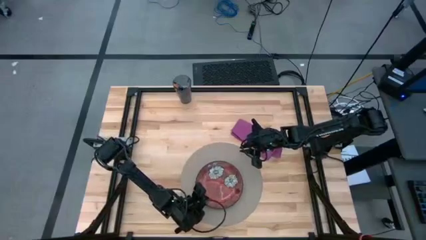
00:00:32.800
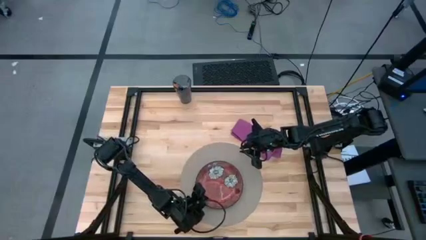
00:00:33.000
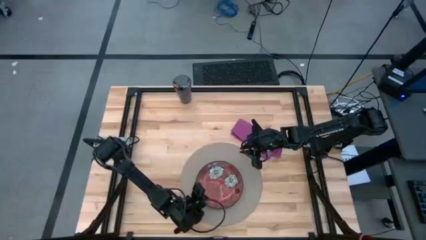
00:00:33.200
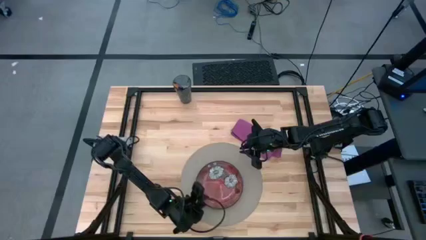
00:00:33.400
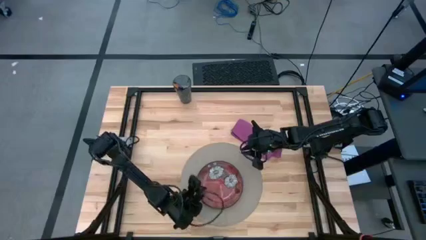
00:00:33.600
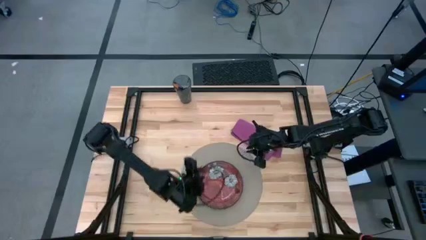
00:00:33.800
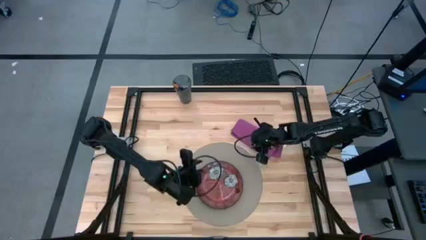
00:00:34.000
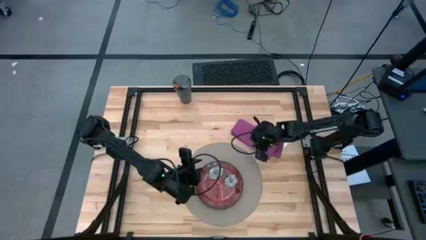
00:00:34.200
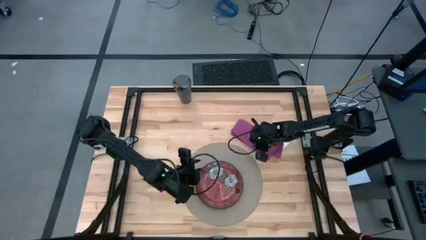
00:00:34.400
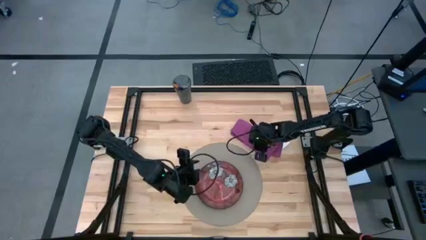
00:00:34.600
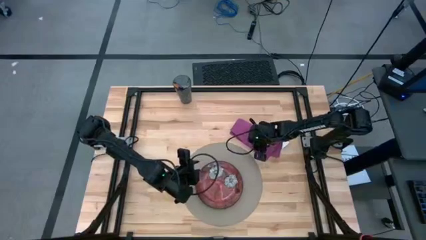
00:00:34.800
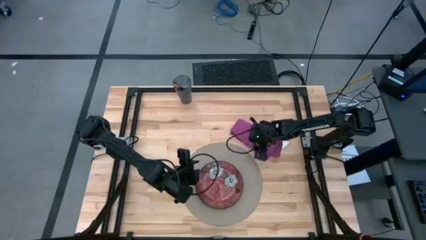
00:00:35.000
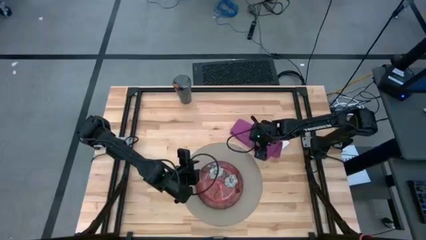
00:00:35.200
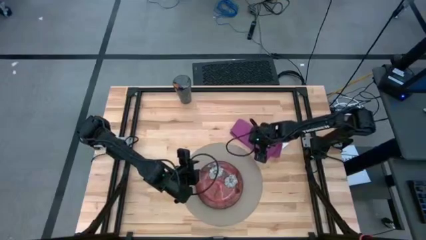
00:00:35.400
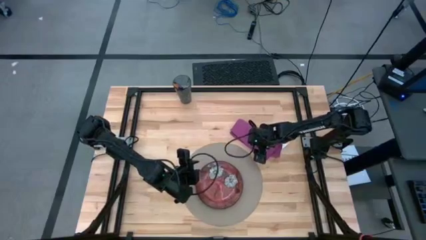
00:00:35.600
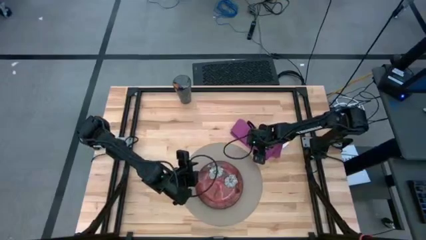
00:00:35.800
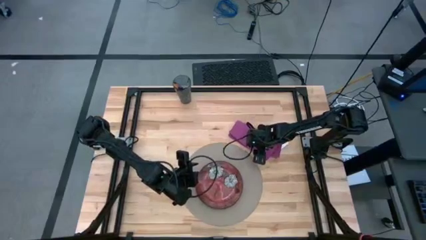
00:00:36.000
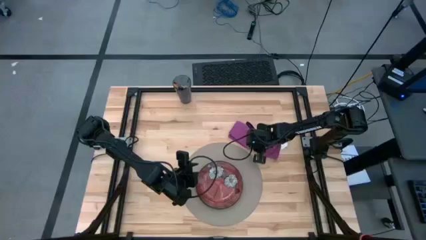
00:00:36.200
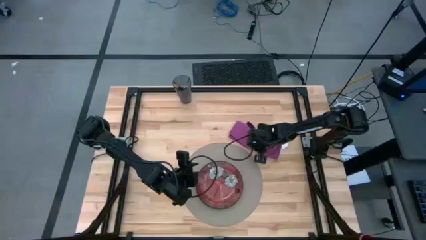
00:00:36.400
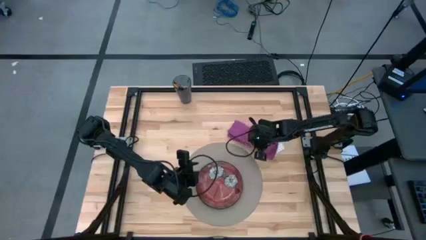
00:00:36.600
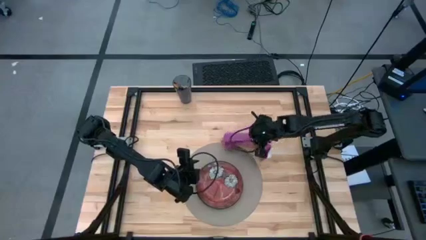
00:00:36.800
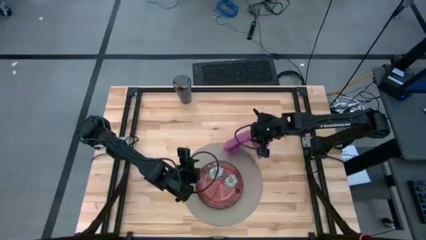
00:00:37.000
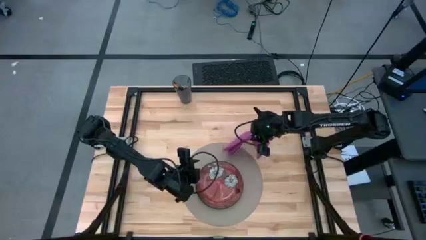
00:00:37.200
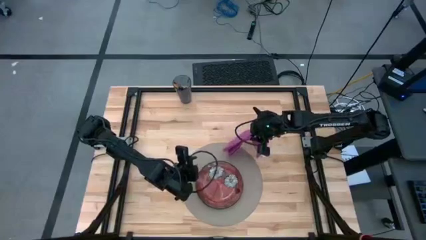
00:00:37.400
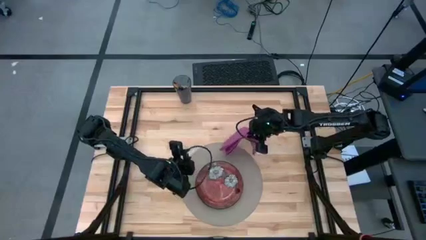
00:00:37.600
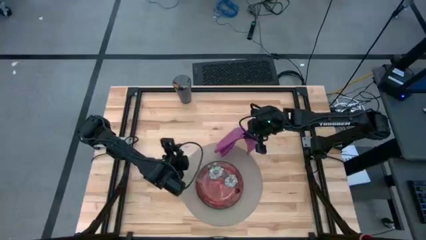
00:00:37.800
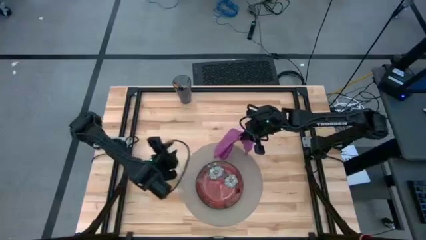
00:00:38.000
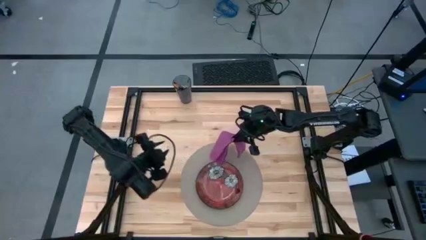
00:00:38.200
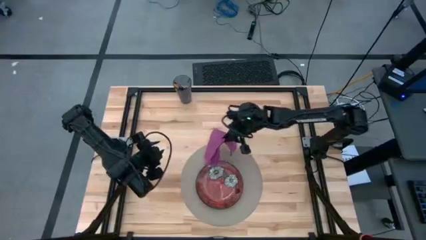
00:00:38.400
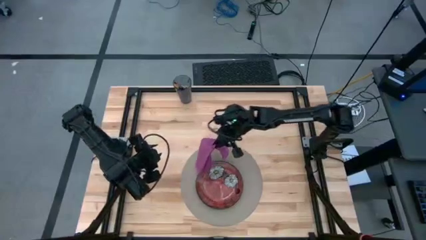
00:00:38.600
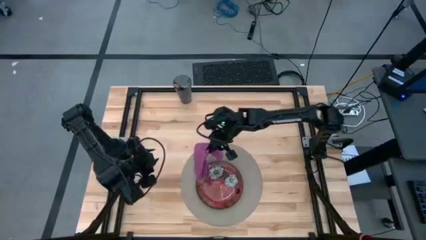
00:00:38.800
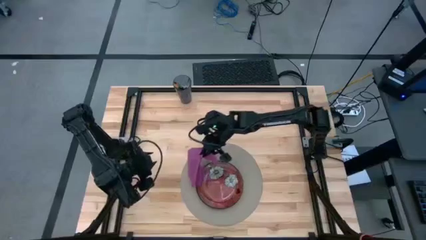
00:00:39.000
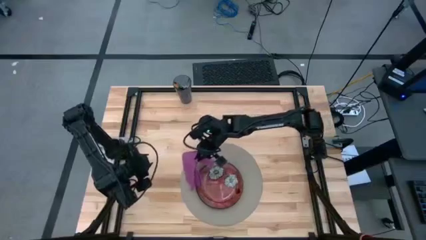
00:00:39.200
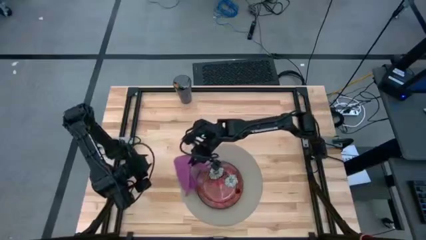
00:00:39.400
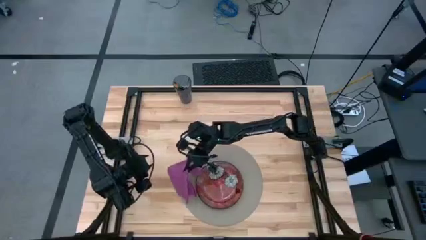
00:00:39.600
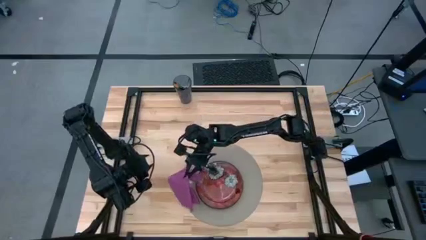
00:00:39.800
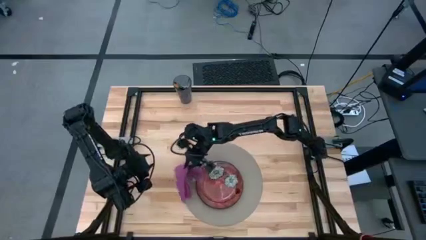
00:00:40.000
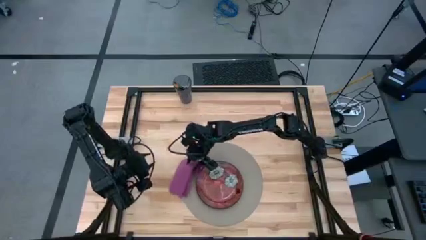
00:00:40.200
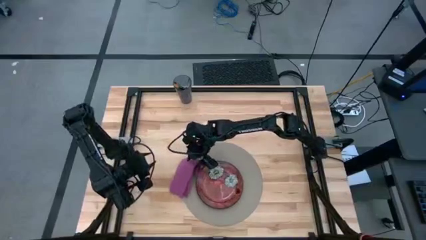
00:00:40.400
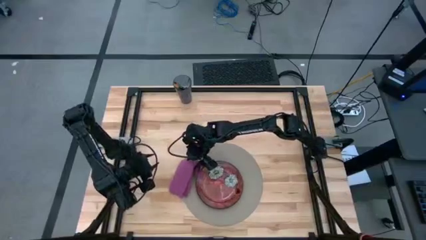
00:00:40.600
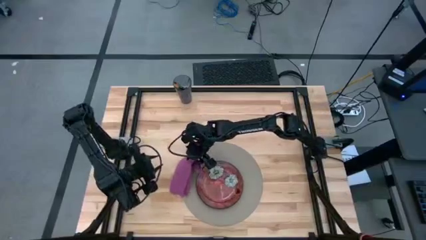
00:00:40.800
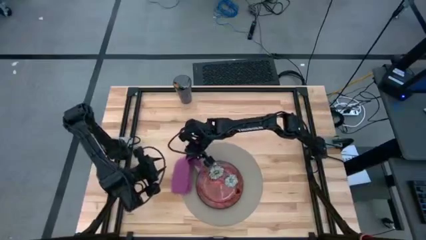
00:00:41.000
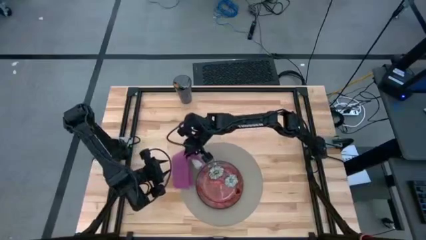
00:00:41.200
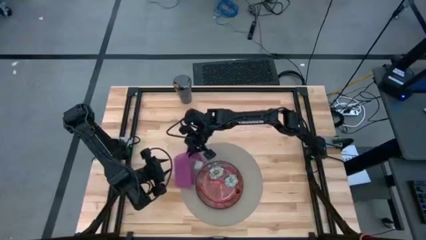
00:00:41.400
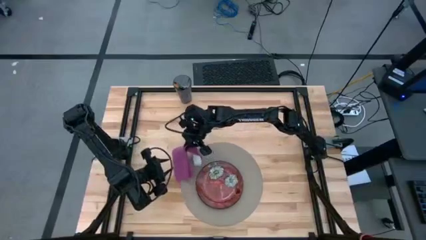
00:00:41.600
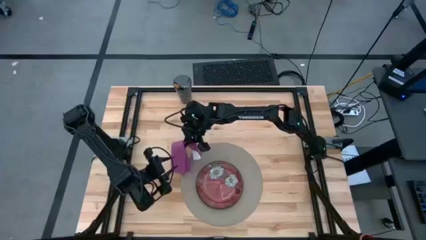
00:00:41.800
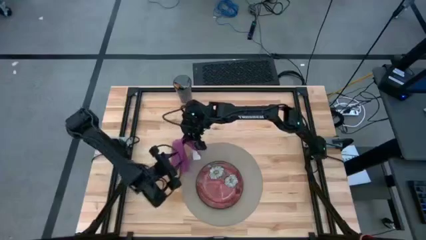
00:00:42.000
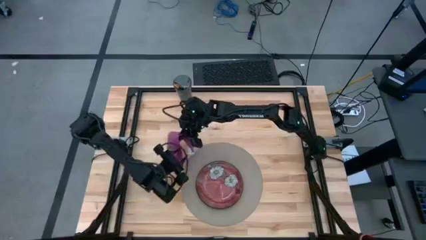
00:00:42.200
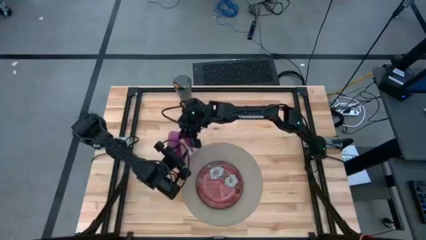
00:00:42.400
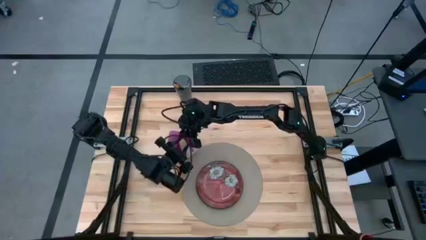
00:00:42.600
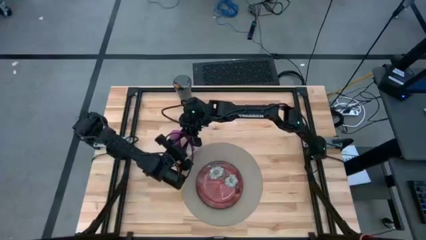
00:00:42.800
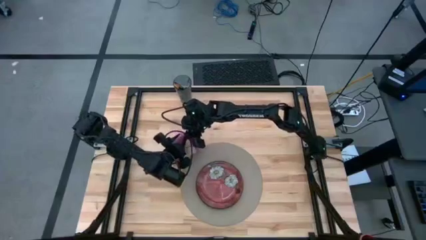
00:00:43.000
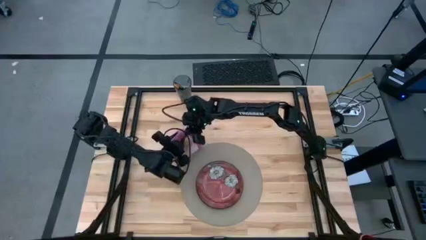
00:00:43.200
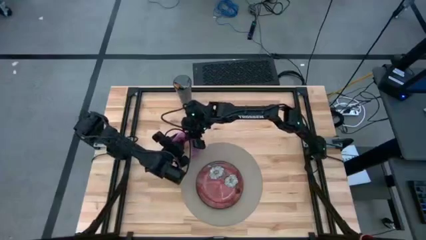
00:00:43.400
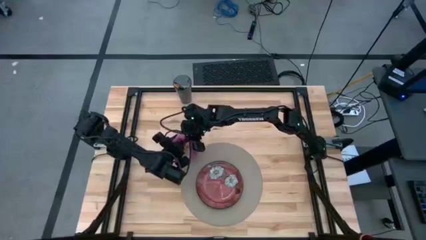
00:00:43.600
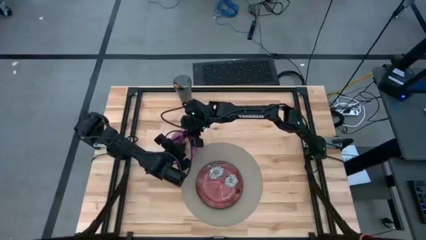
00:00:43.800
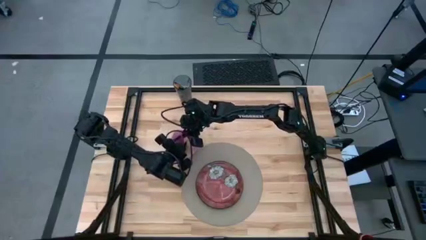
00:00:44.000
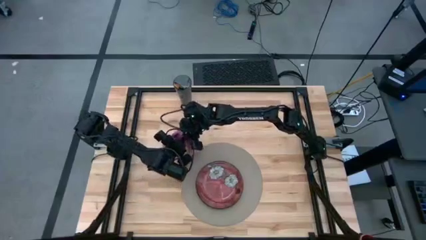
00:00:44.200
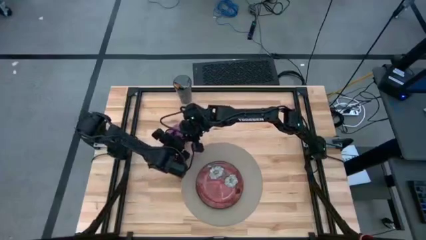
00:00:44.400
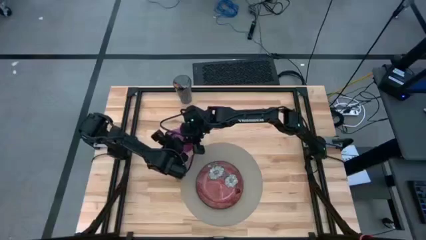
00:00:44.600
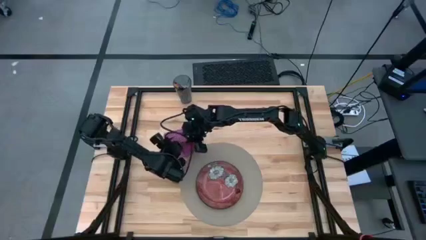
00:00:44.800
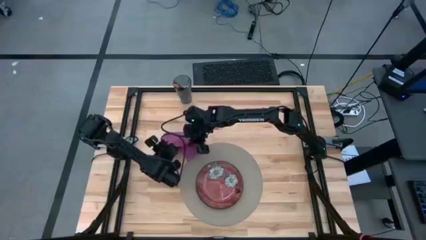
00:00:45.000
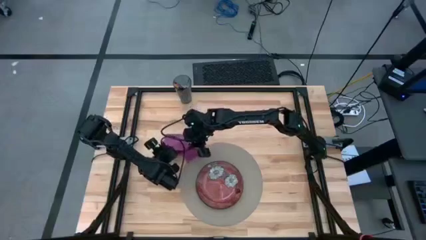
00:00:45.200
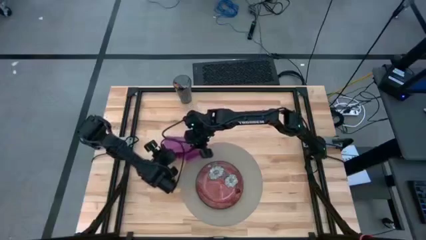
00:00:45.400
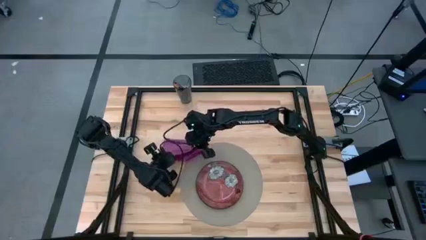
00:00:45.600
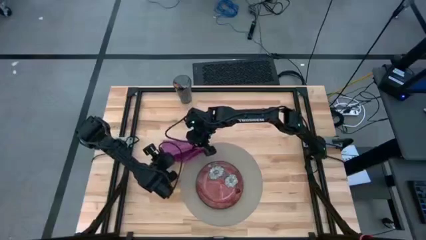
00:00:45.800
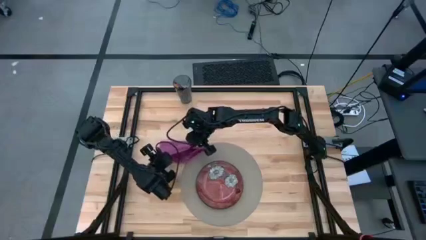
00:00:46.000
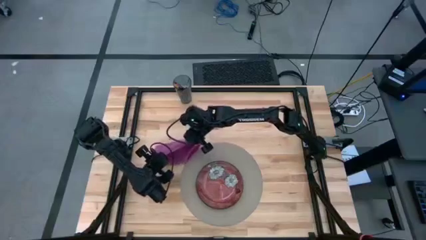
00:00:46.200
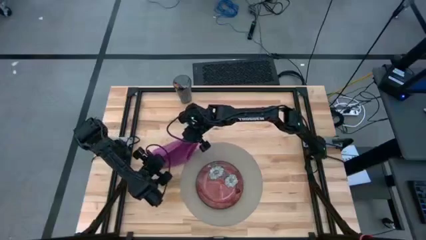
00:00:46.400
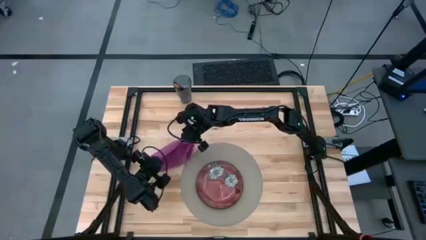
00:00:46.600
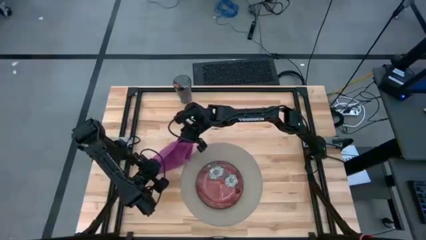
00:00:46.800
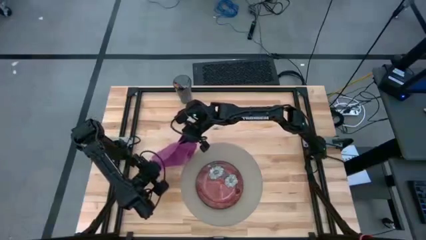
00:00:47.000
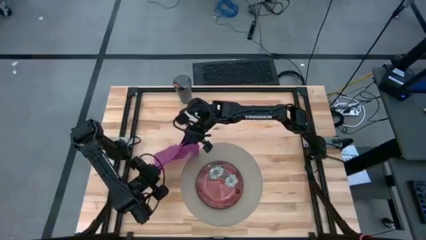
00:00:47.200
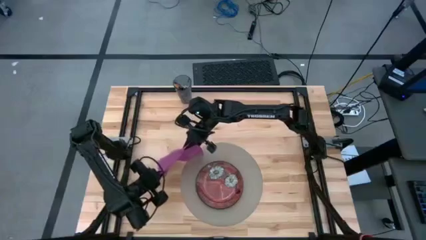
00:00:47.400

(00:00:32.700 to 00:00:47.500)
Task: Set table place
Move the pink napkin to the middle left of the table
